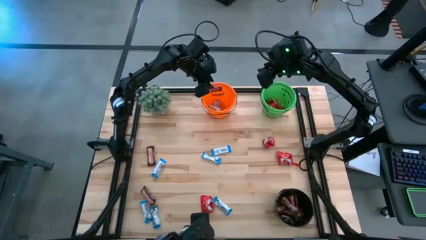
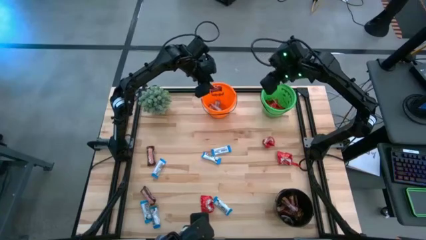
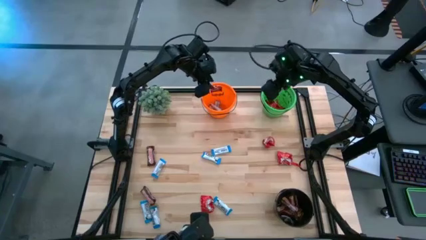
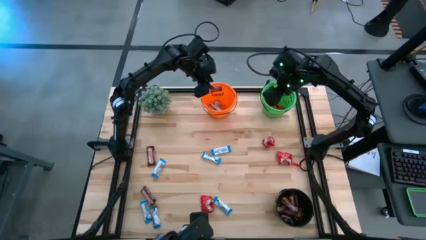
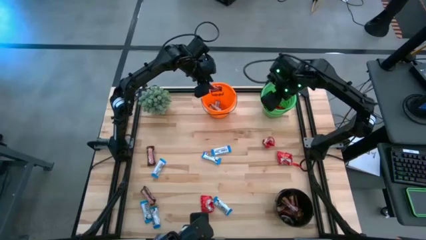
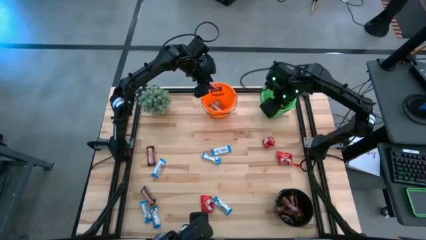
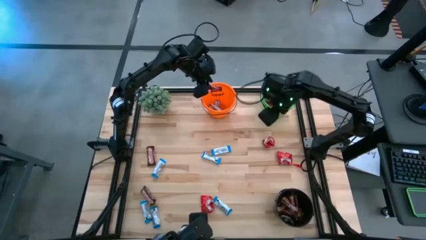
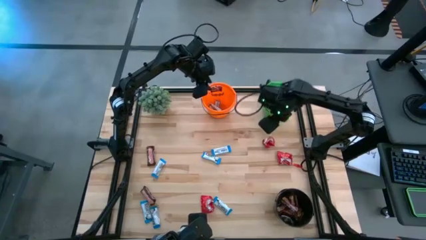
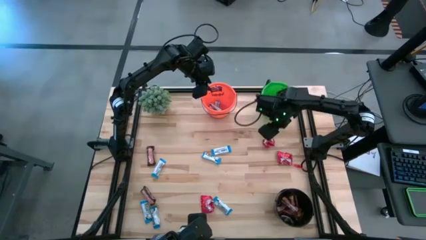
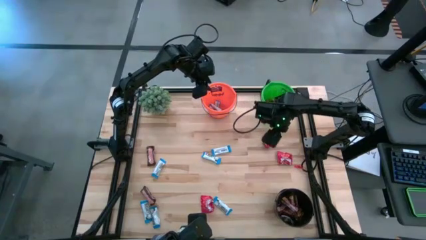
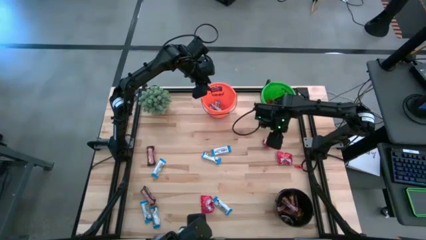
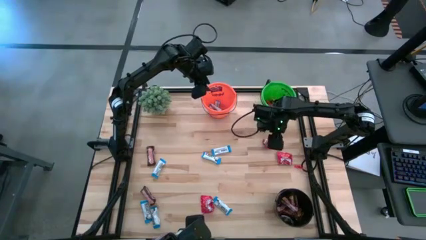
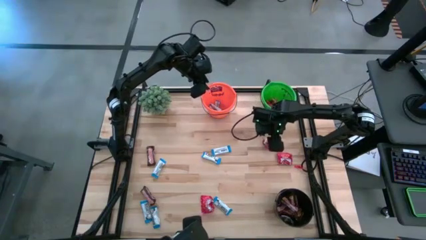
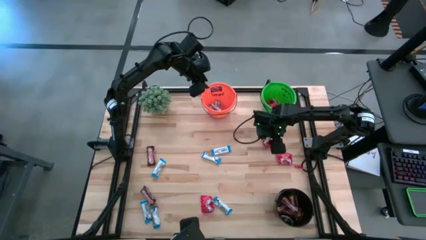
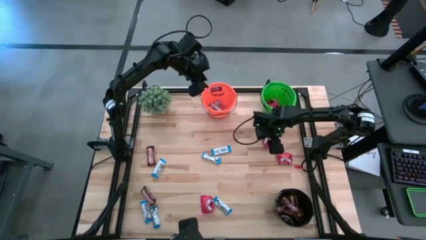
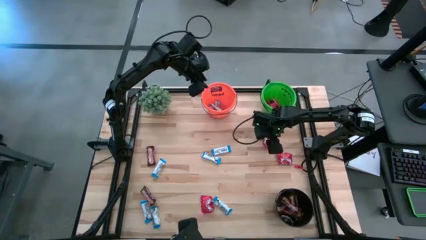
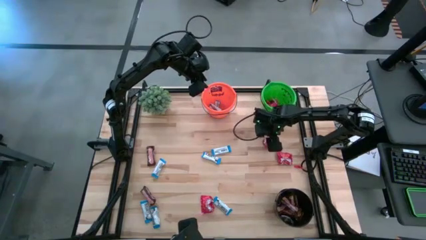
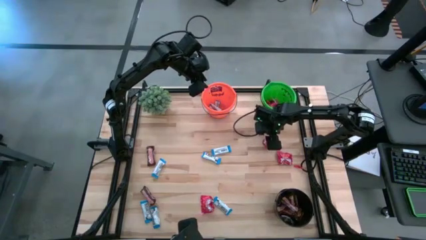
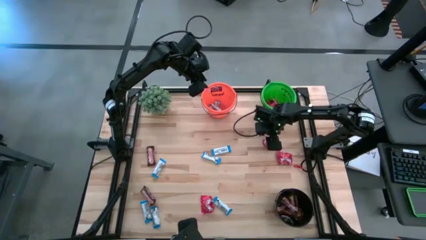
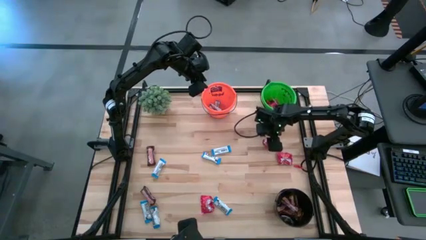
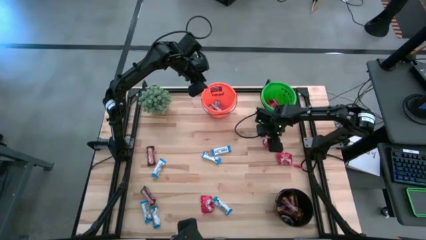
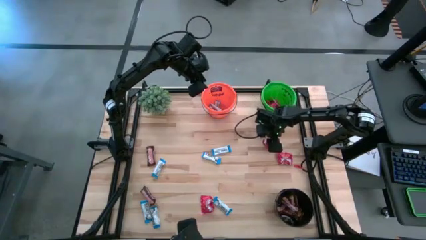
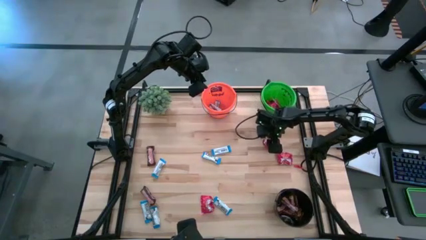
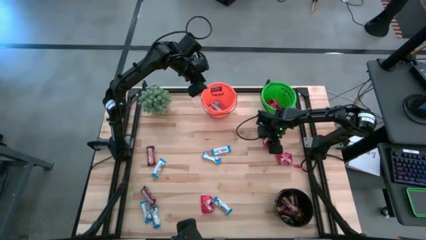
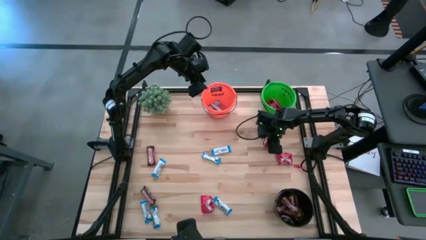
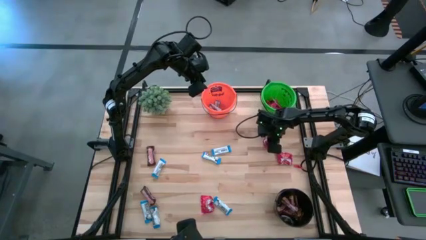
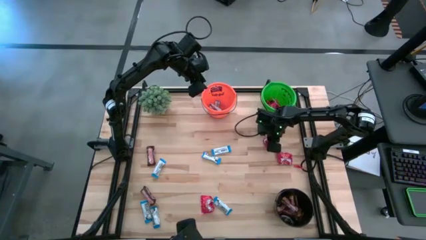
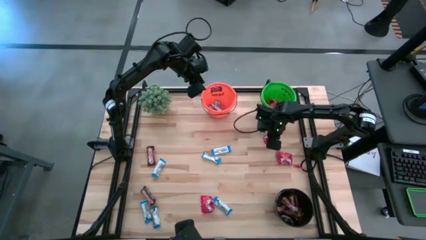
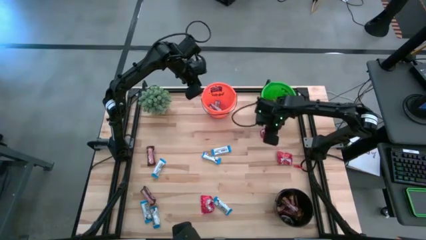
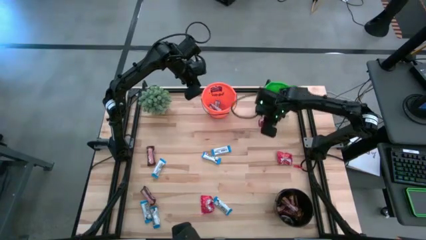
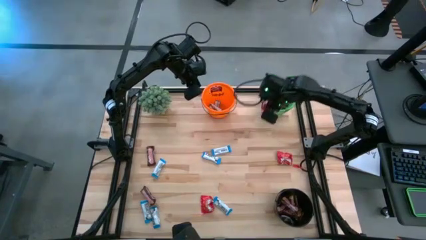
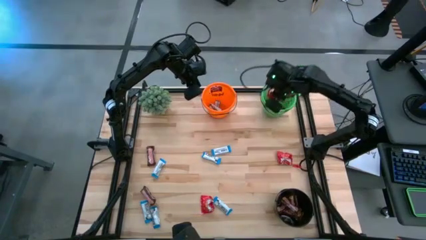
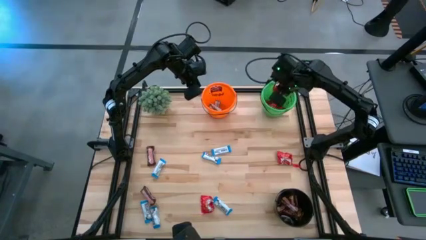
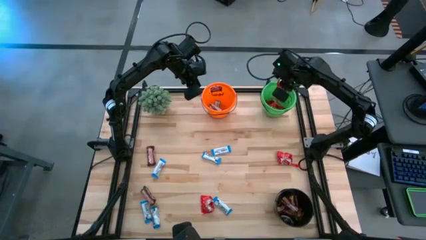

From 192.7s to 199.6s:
Task: Organize candy in baskets
Put the red candy into the green bucket

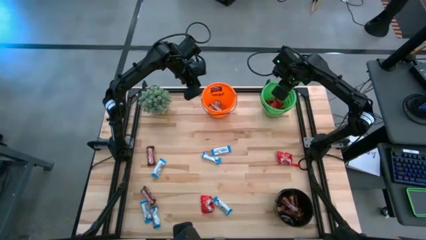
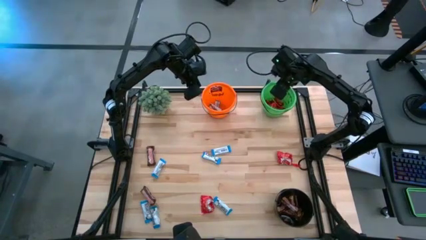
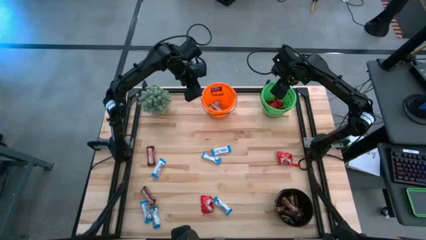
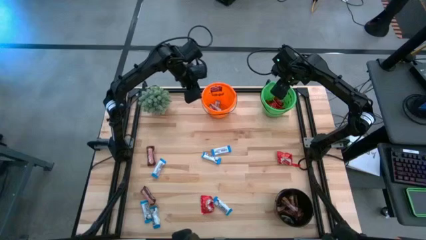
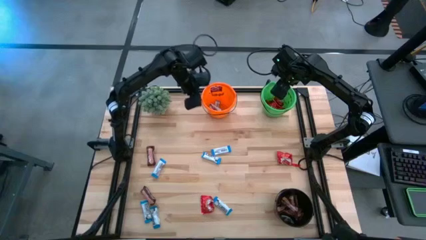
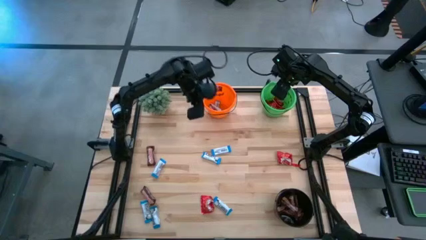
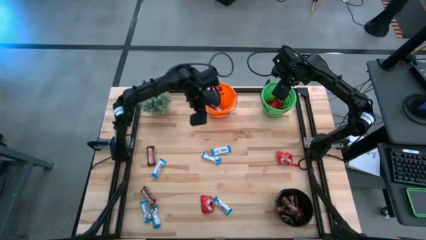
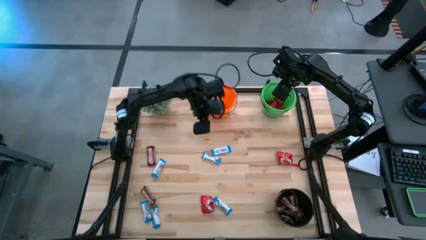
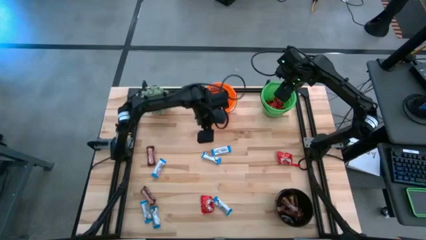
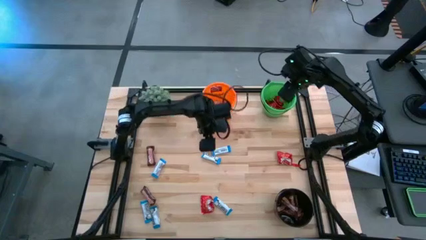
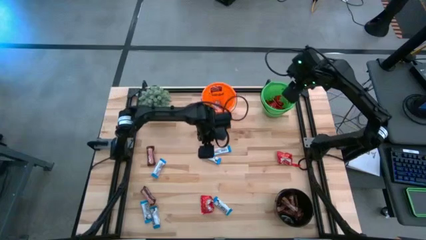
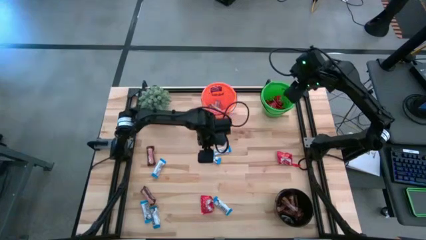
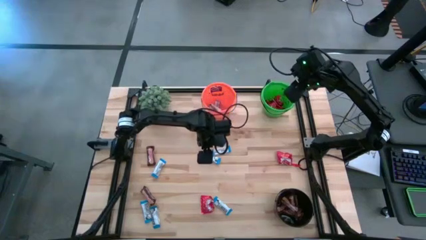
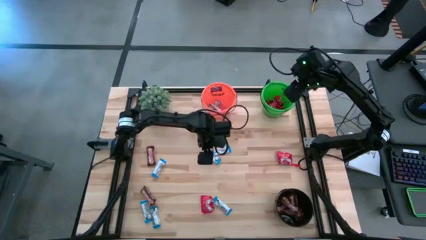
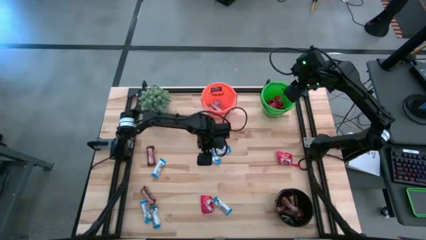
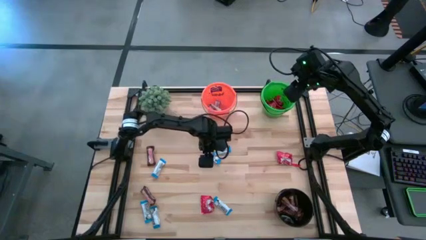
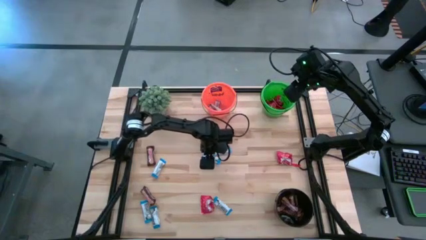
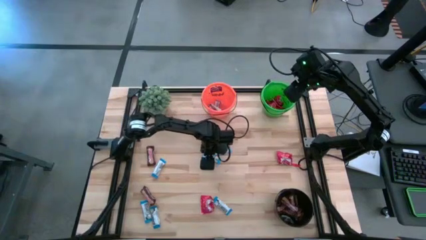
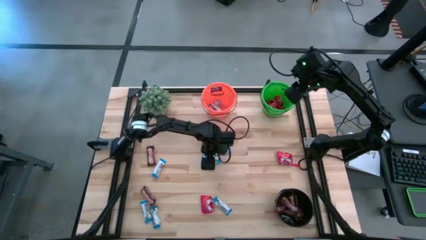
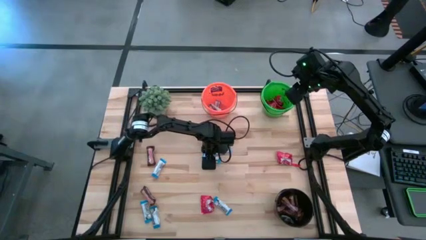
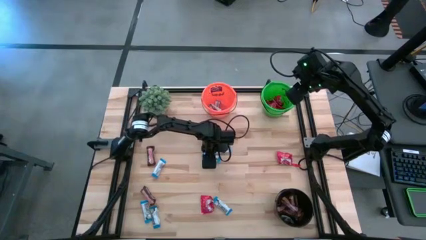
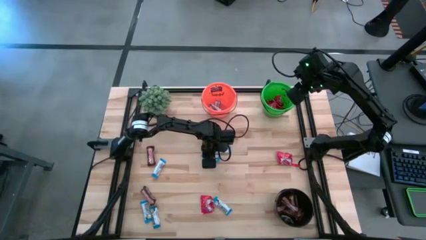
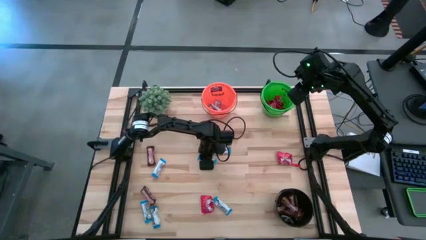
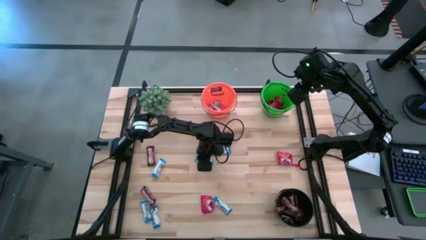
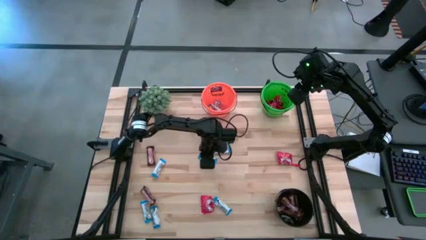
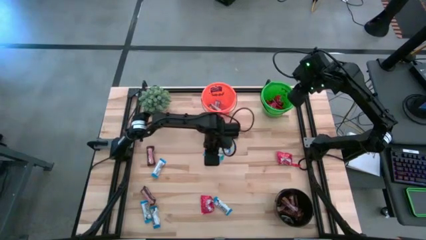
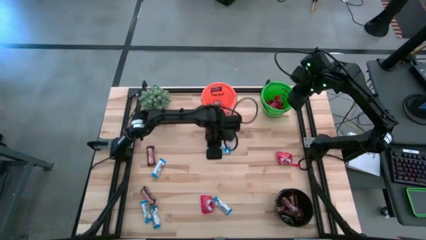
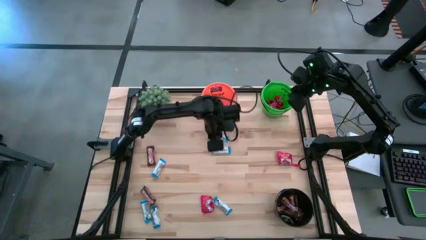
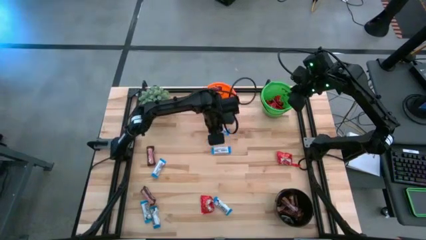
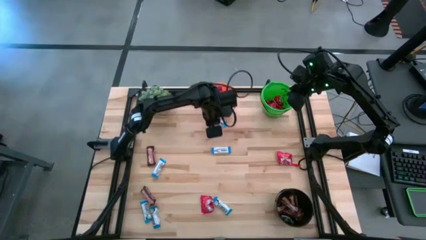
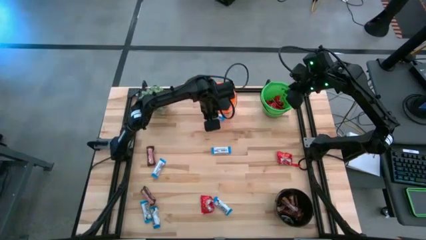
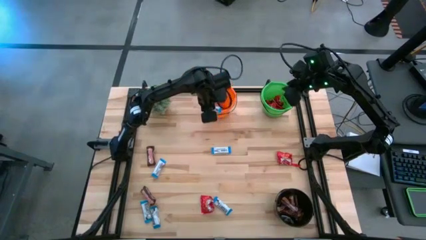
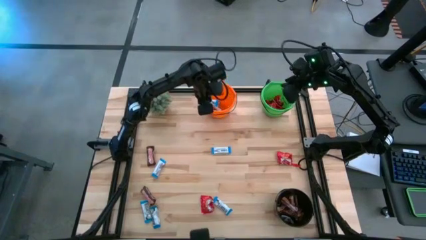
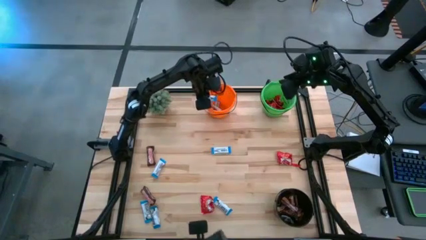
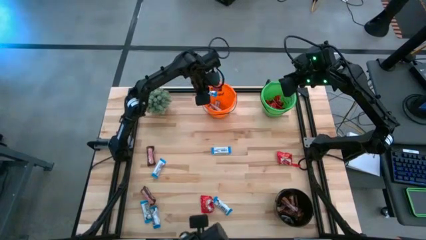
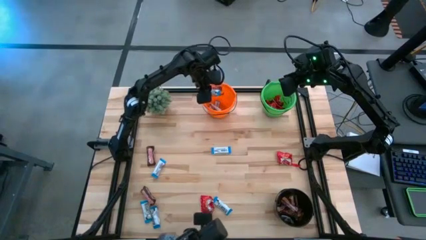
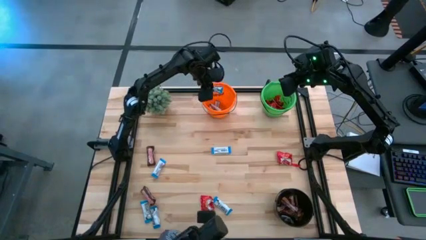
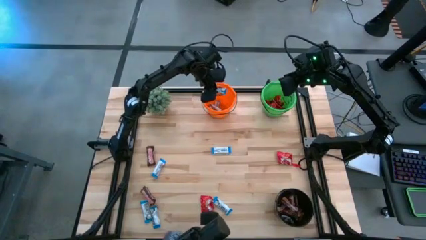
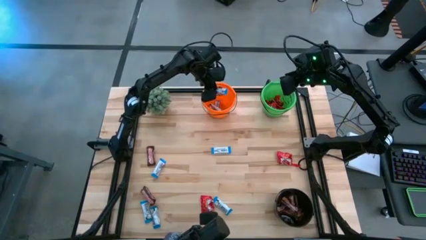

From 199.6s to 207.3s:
Put the white chocolate bar into the orange bucket

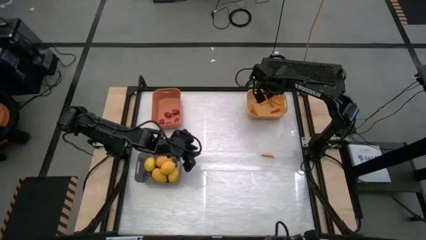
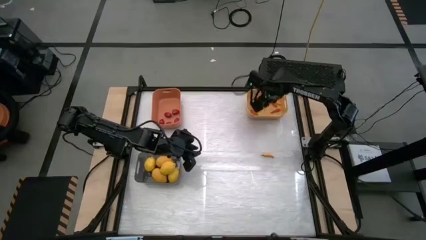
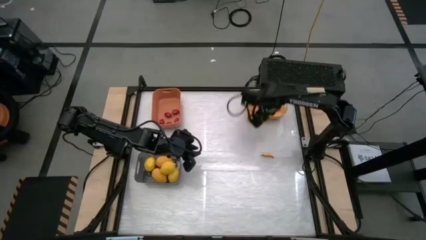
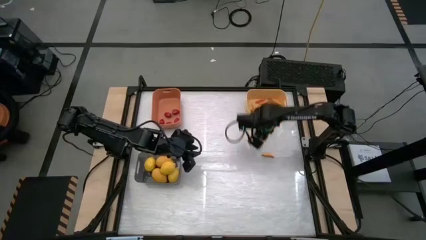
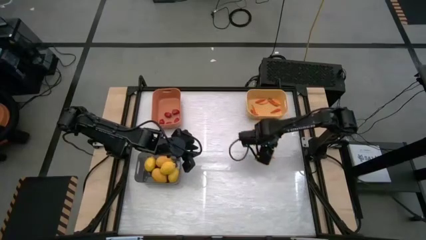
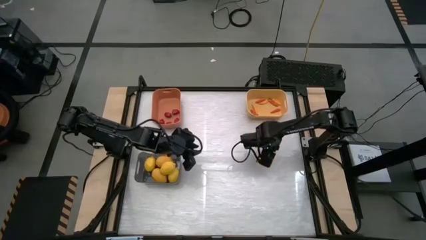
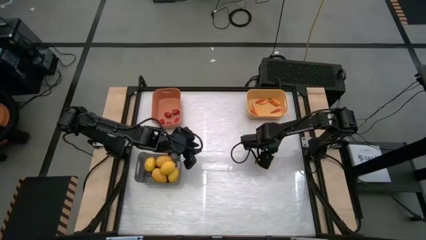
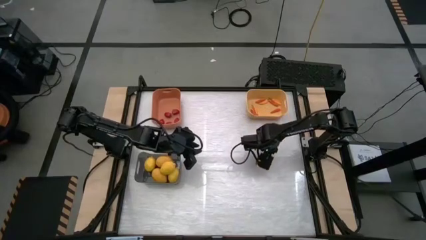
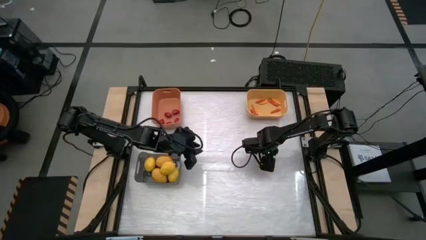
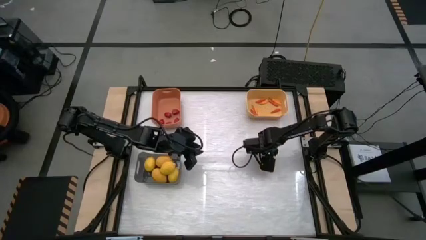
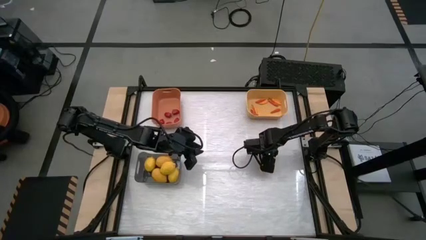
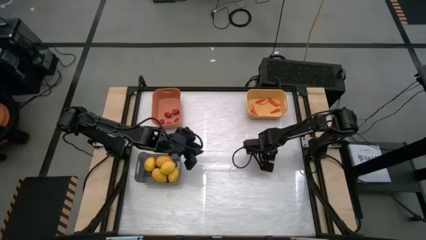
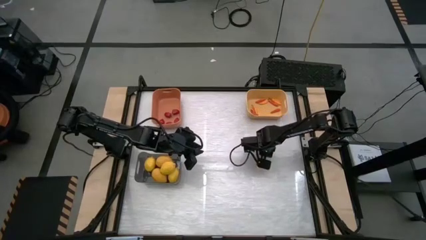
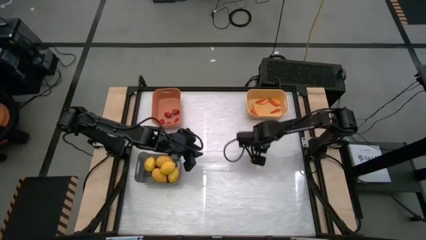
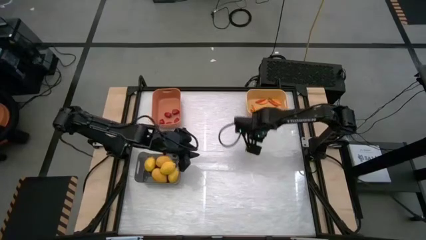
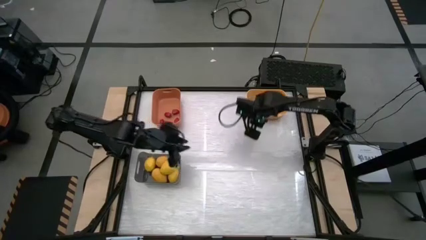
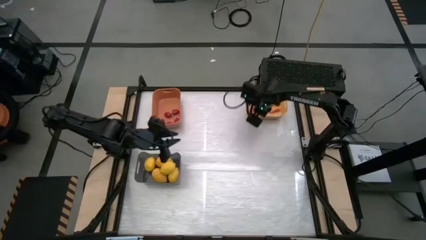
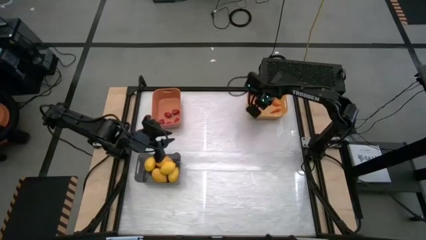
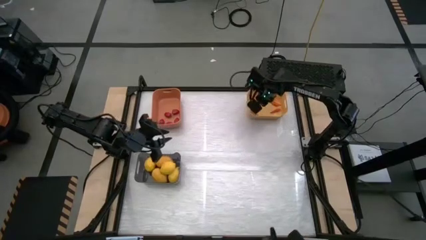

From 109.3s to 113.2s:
Task: Sort produce into baskets
Put the yellow chili pepper into the yellow bin
